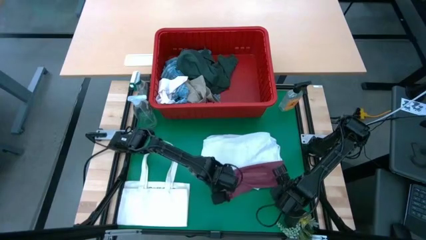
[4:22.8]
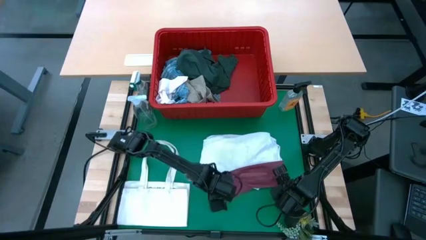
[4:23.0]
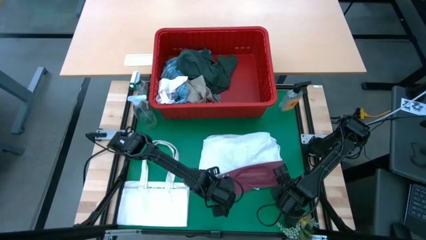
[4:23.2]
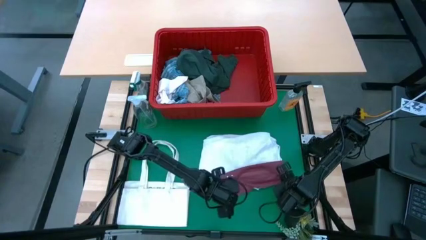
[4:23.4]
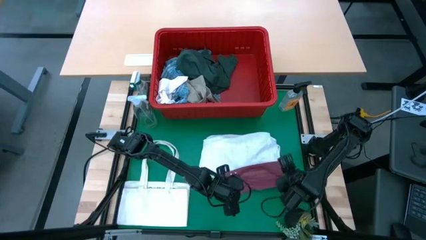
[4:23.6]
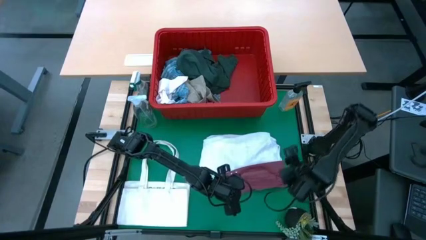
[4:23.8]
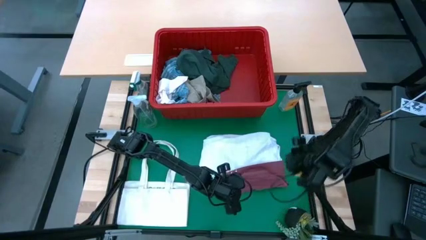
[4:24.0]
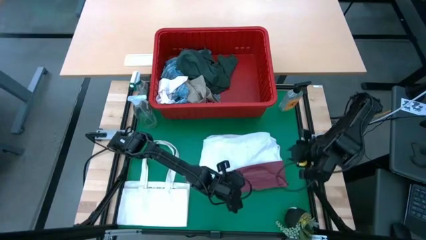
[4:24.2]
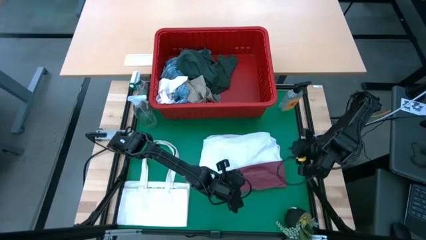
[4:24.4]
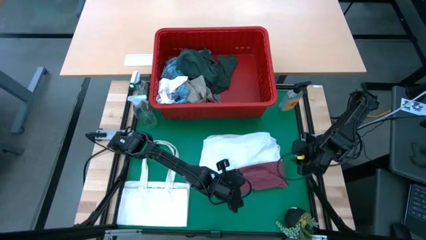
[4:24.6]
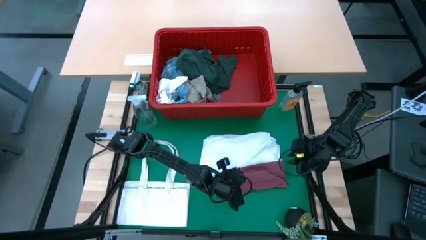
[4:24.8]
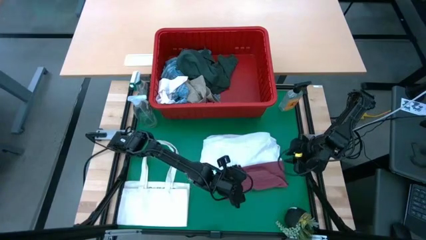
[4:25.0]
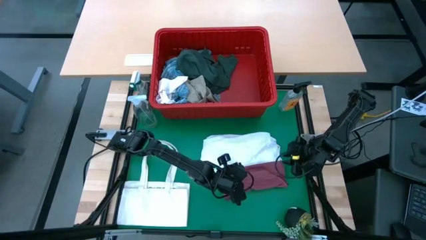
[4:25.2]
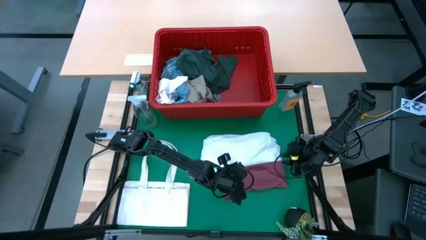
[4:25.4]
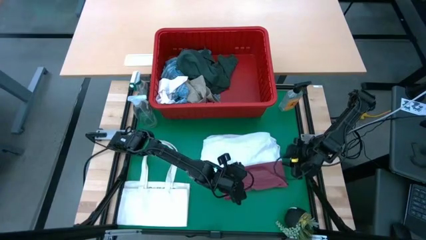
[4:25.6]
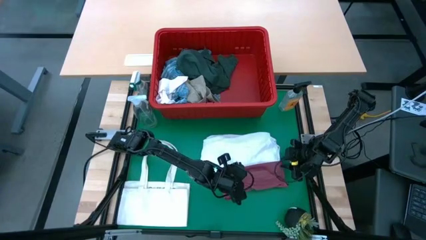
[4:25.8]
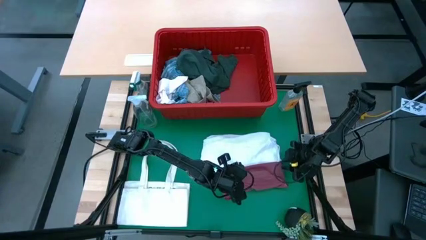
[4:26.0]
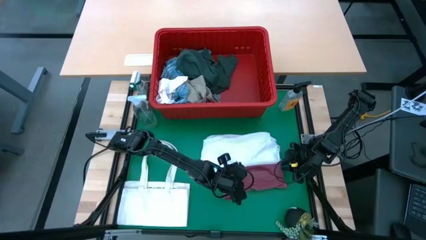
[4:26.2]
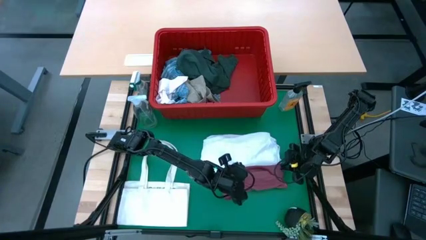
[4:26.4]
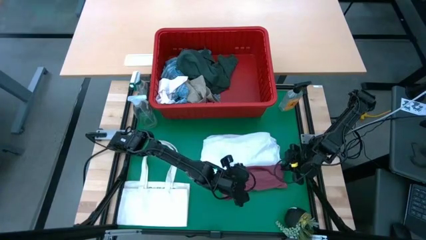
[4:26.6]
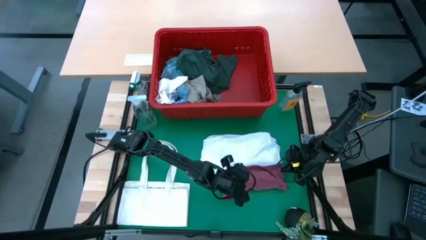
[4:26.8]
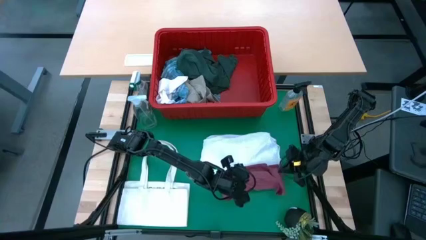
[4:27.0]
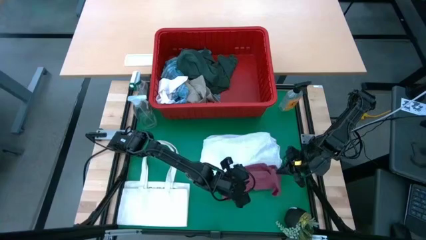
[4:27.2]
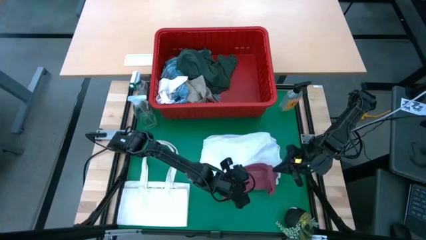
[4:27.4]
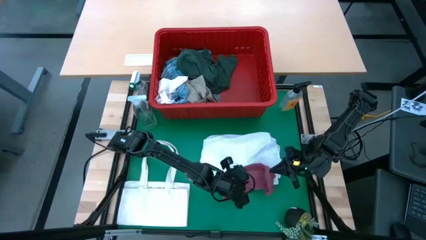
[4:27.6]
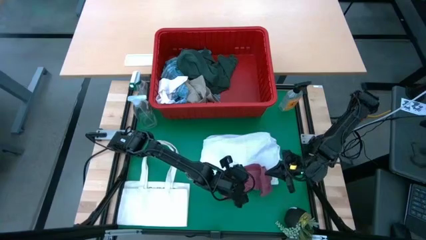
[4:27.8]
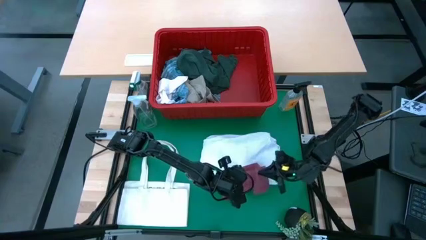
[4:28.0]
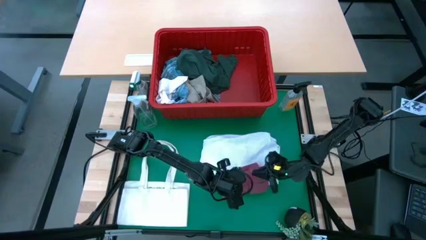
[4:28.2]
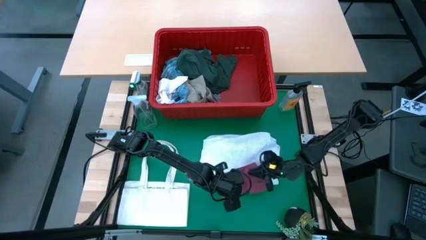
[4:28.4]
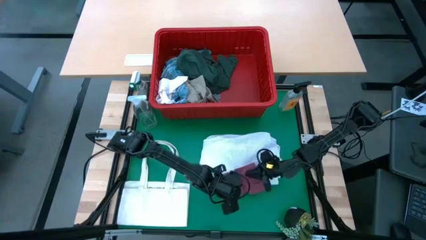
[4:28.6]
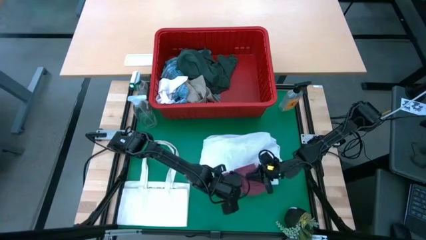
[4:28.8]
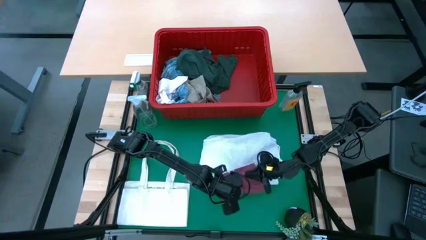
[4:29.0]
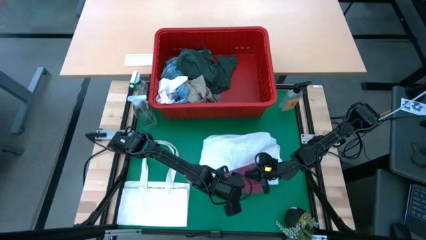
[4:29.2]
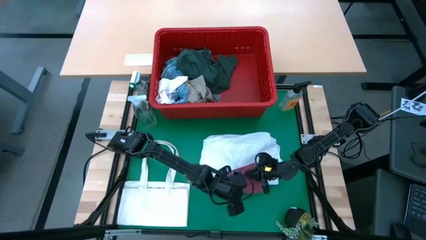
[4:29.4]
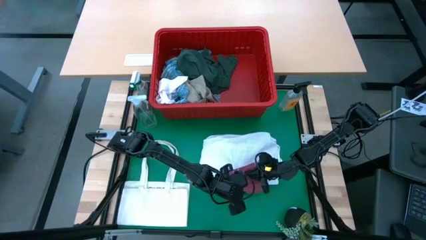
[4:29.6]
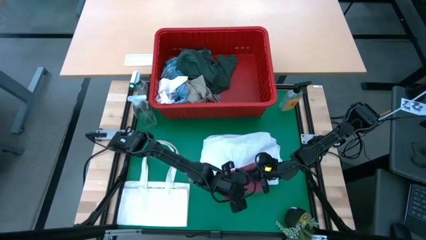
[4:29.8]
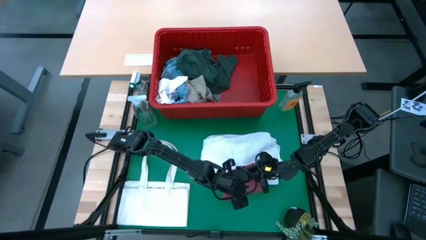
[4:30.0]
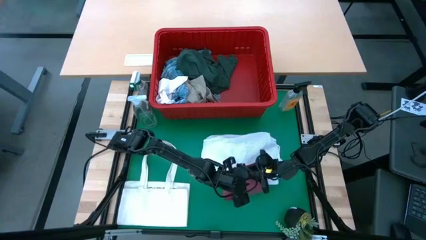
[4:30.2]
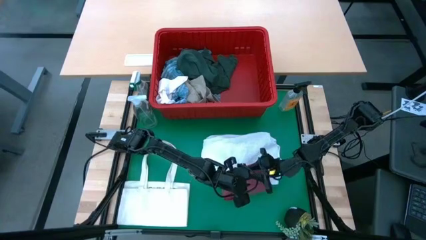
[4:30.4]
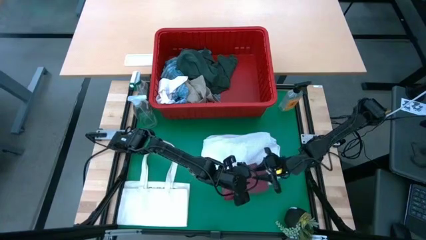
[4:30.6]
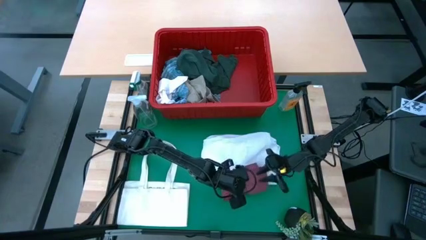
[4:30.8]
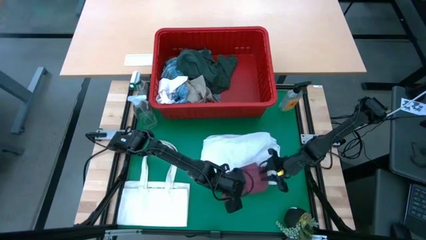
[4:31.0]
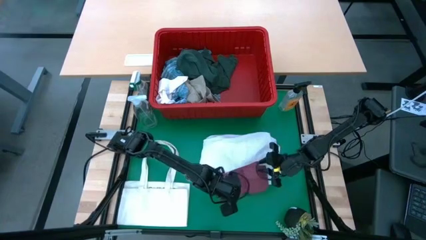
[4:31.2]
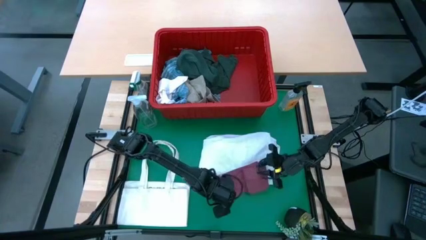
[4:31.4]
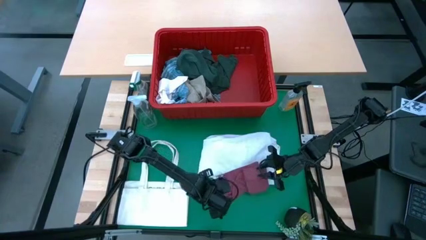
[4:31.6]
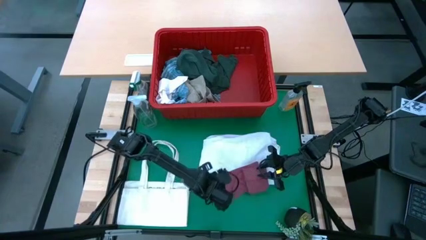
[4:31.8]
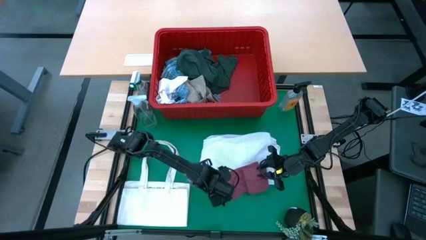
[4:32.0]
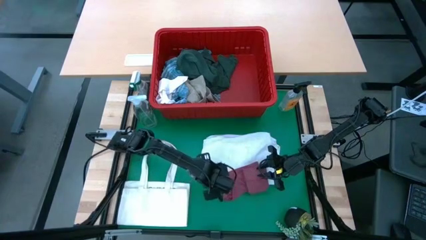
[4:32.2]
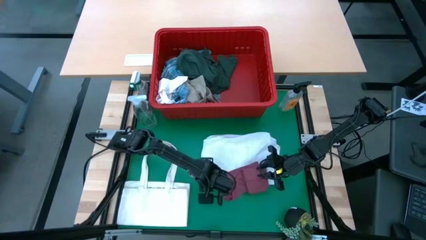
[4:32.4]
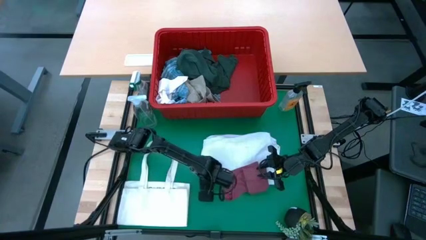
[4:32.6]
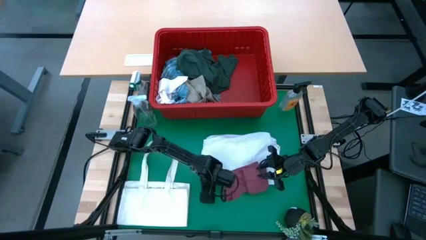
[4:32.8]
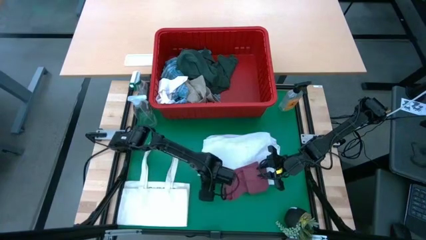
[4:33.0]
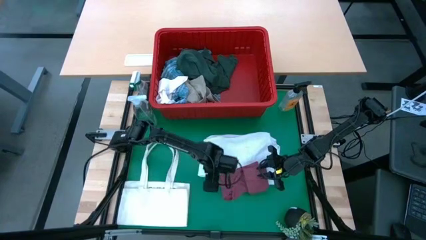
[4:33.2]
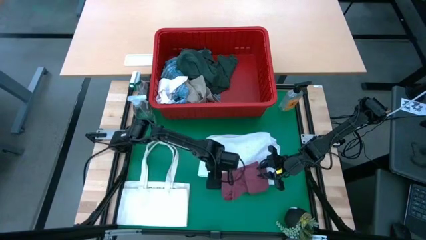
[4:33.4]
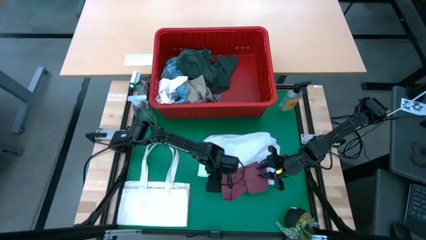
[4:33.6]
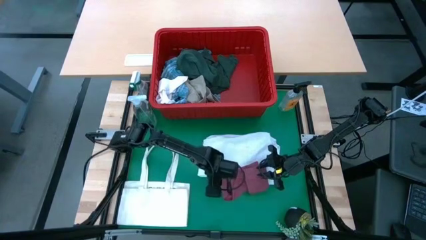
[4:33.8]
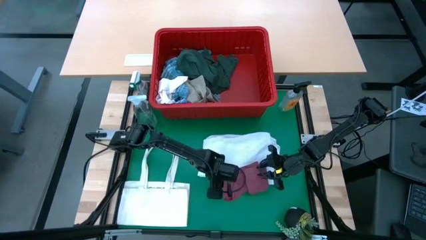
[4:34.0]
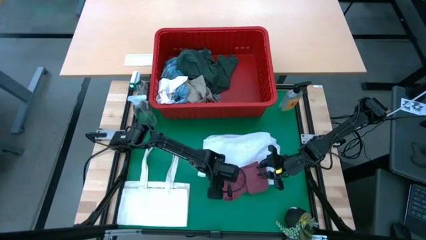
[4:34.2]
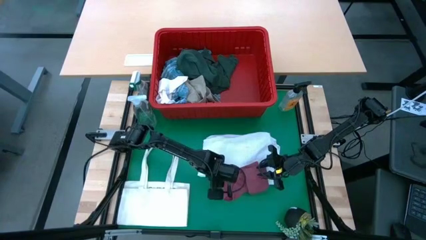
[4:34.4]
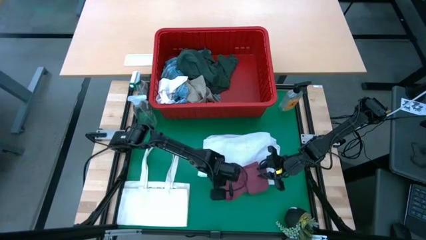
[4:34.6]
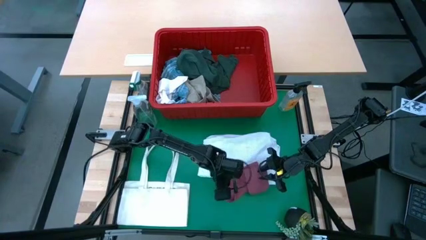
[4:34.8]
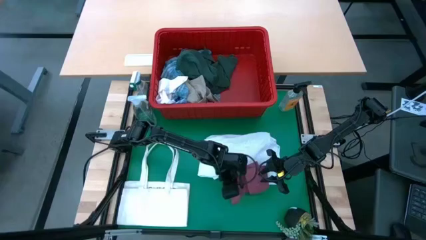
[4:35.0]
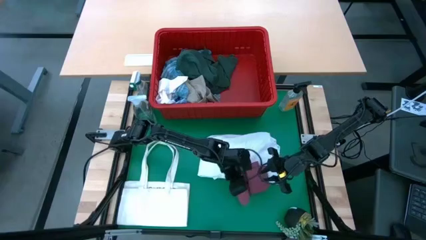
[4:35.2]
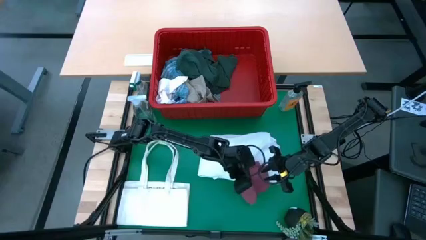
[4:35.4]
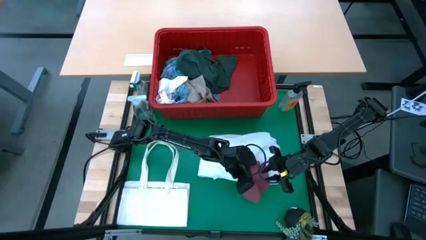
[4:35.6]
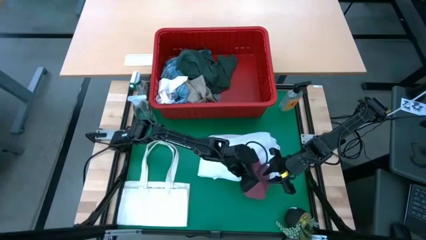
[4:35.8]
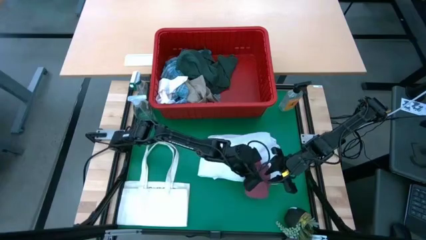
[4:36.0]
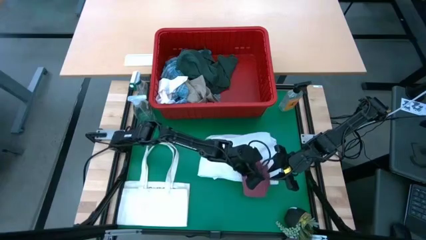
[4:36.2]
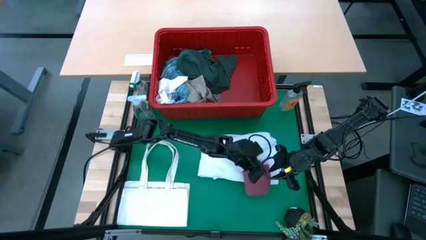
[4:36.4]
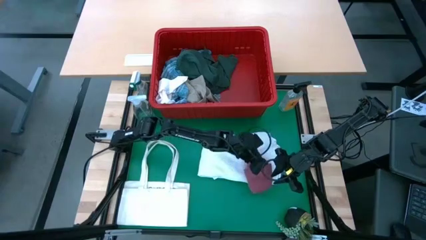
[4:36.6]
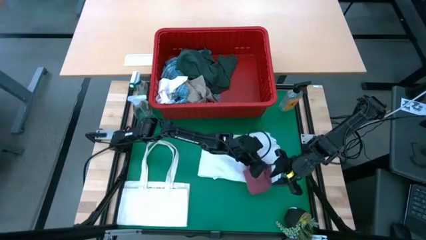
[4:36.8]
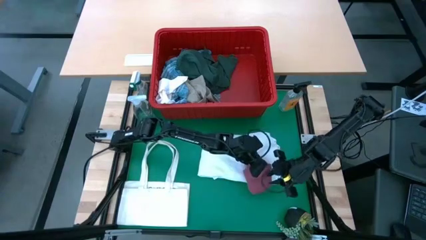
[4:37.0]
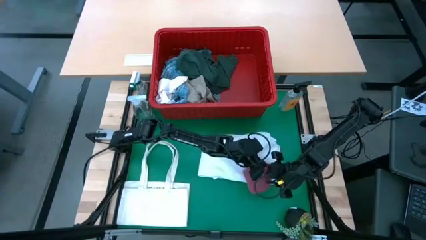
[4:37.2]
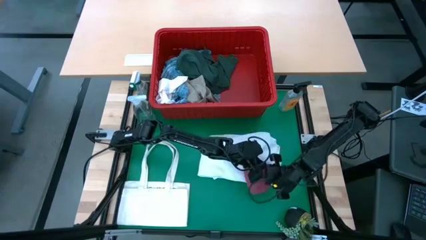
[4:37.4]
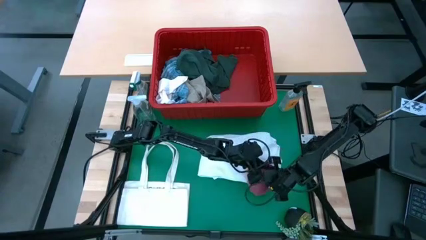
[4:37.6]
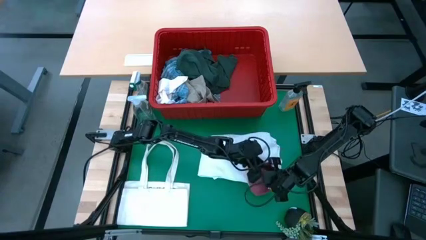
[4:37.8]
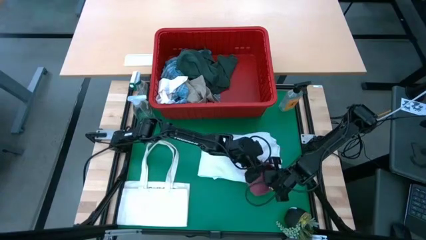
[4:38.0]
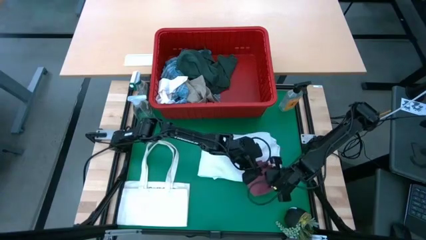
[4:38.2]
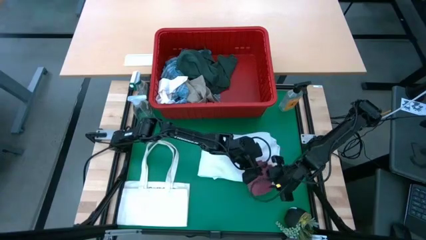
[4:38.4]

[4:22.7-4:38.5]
Task: Fold Laundry from Bin
Fold the pink underwear
